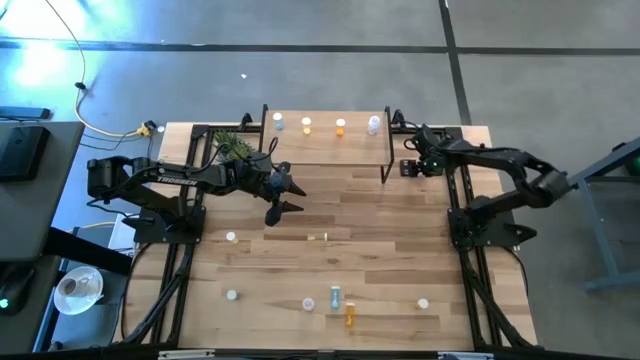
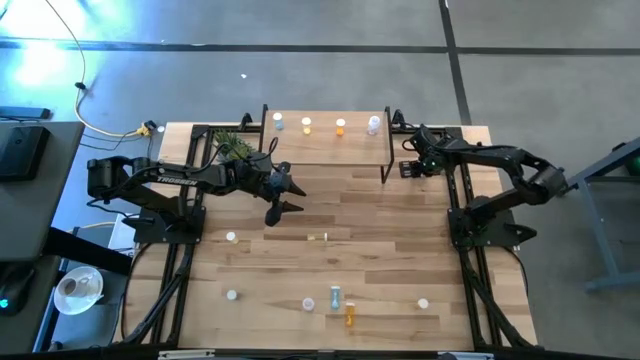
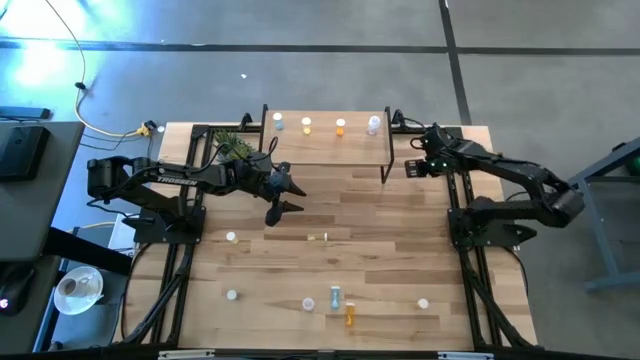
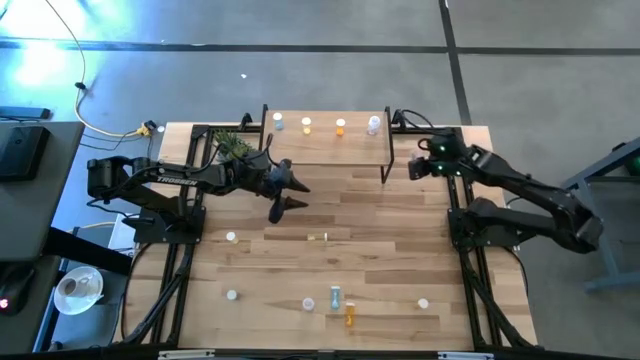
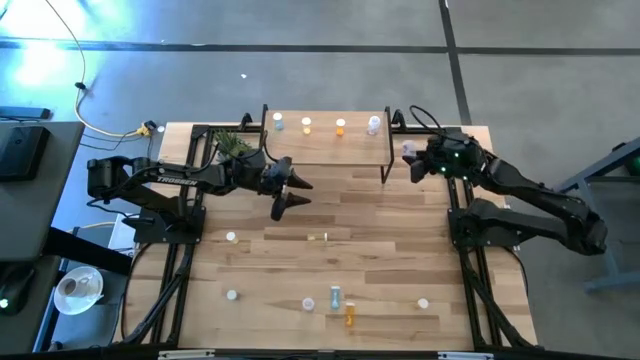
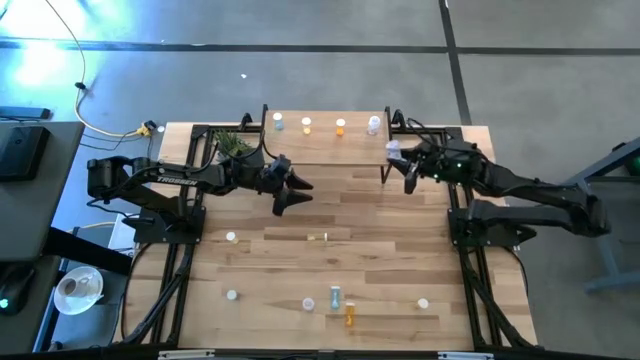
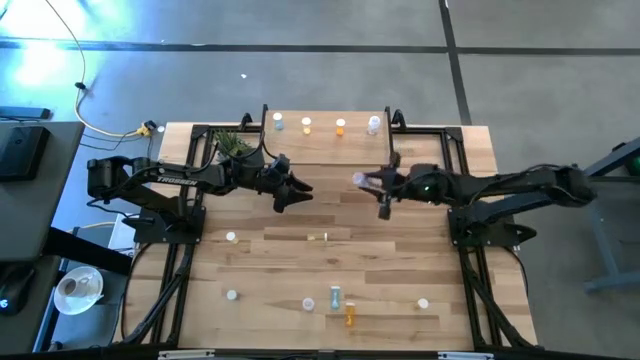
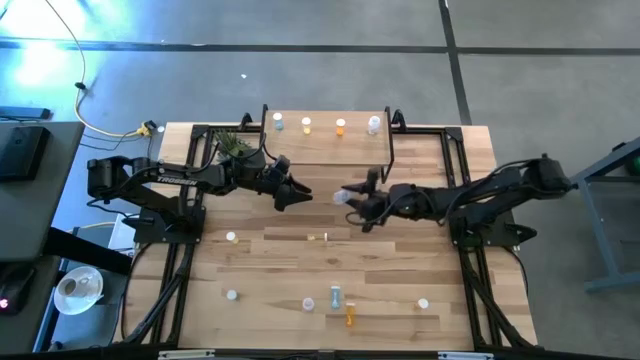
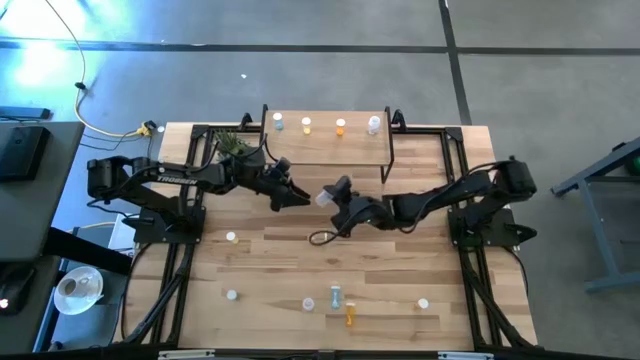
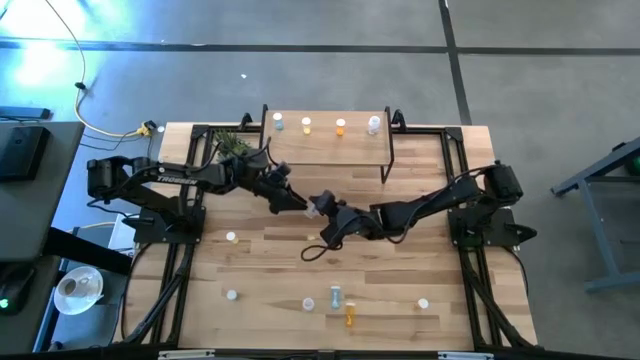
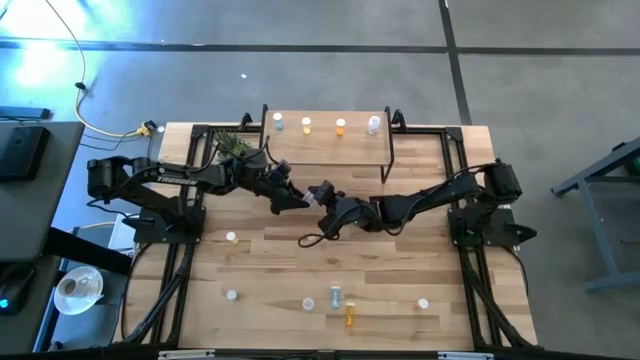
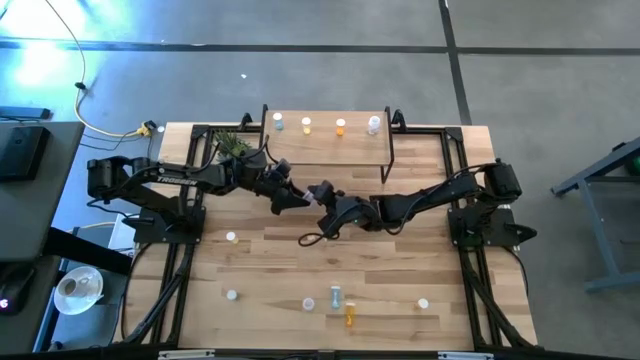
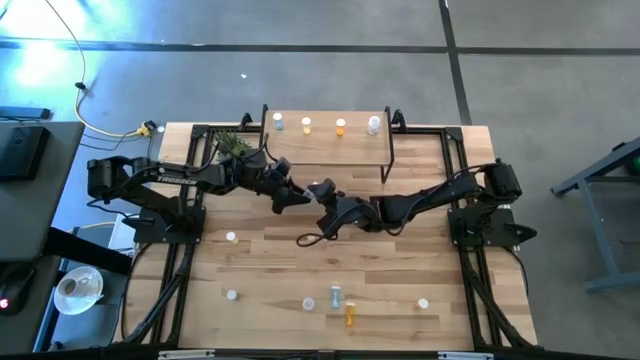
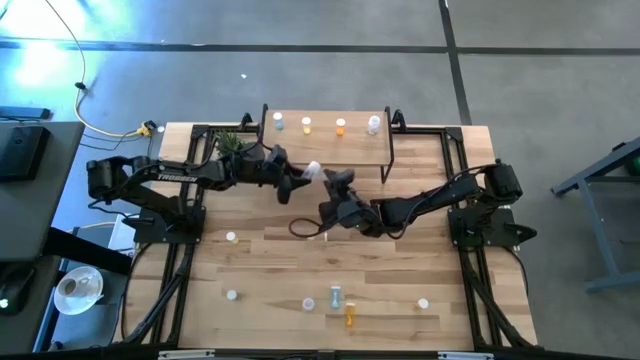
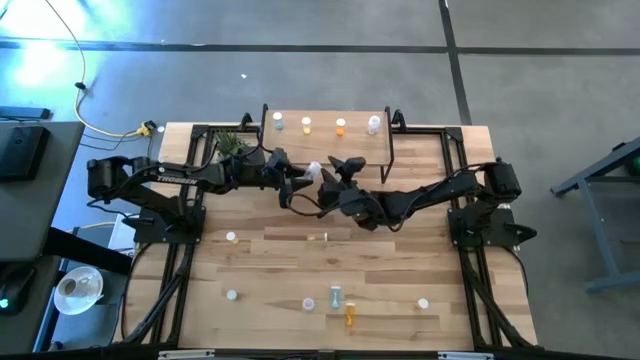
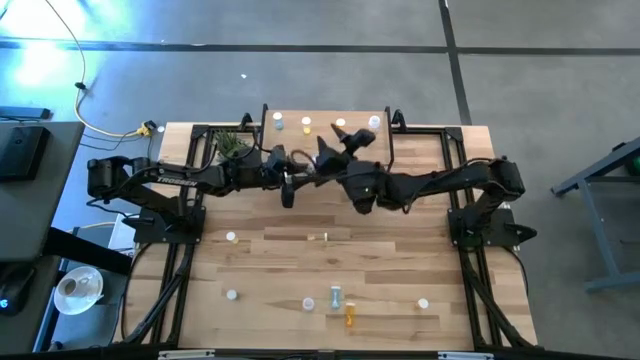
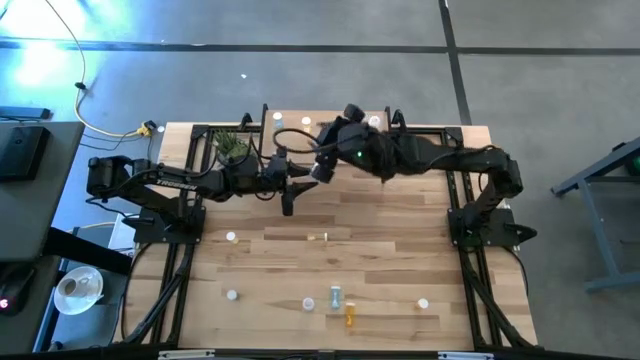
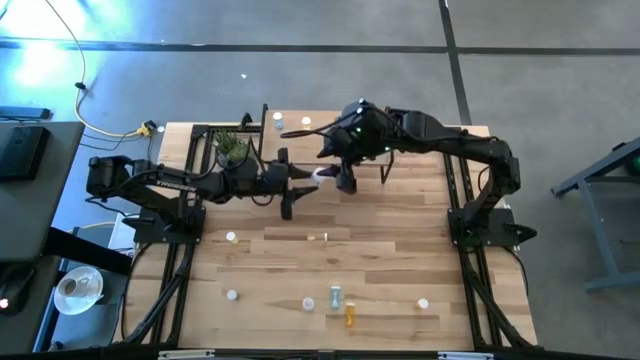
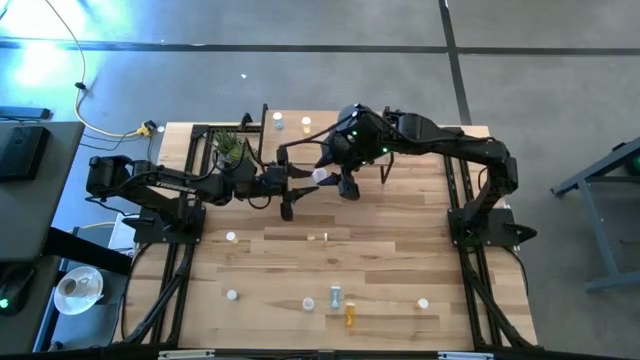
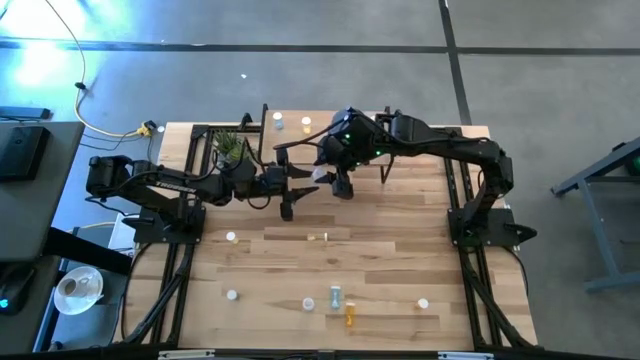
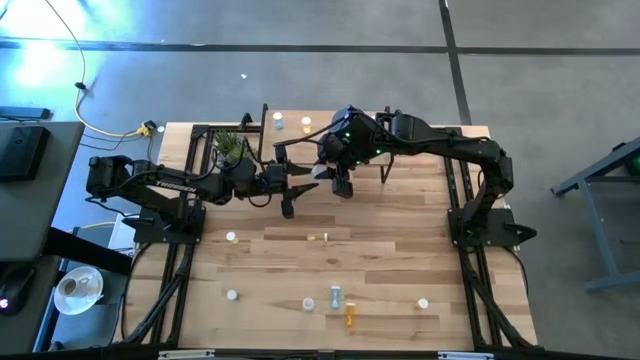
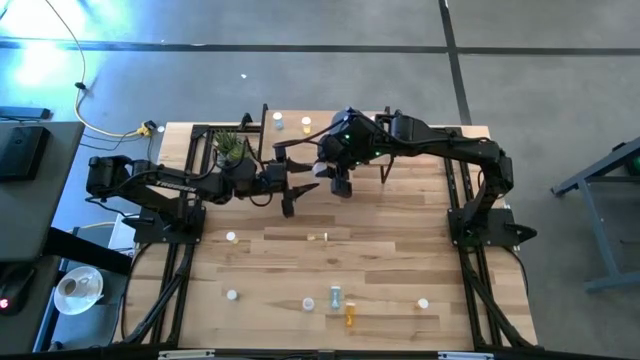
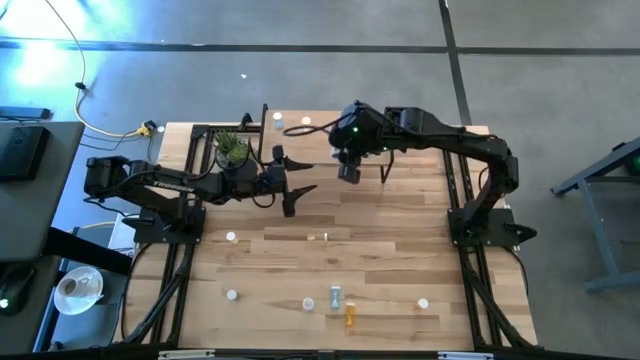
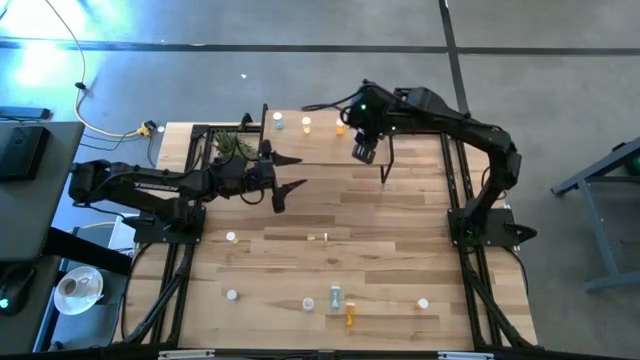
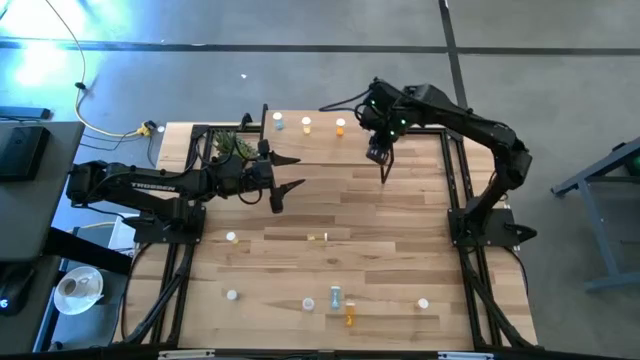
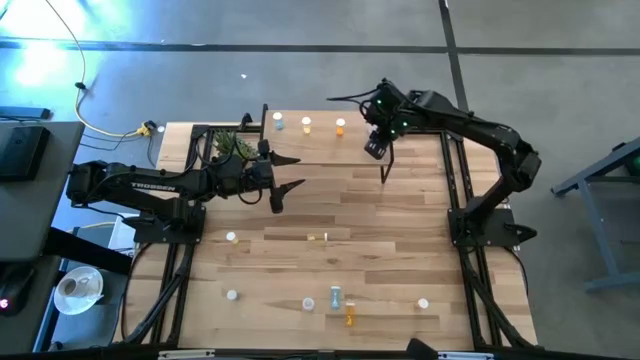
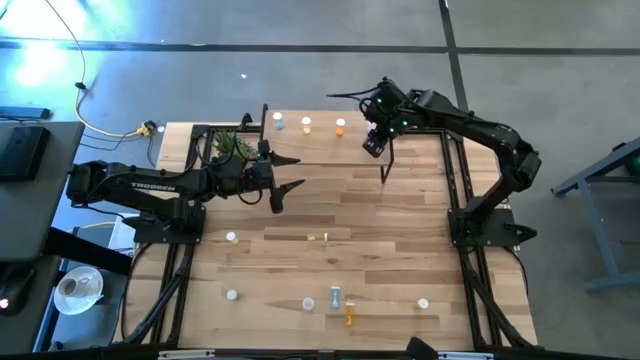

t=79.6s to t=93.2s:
Task: Pick and place medicine bottles onto shelf by color
Put the top transparent pill bottle on the shelf aligned with the transparent pill bottle

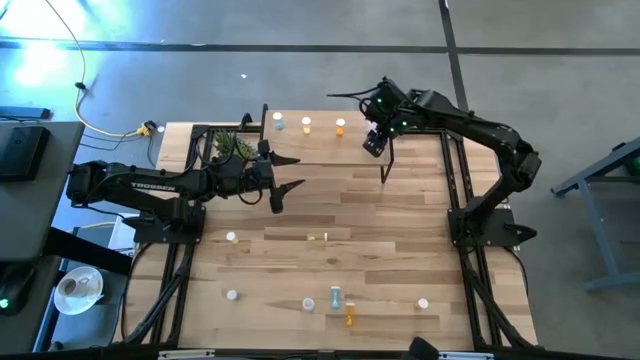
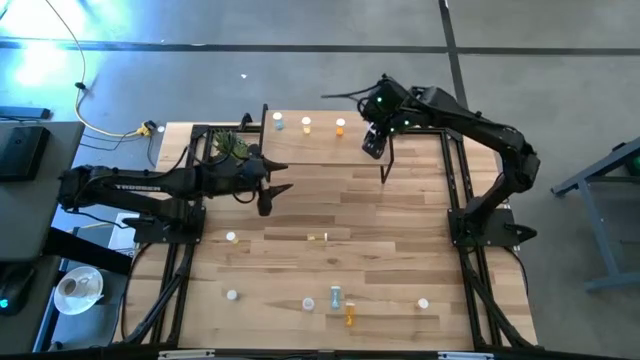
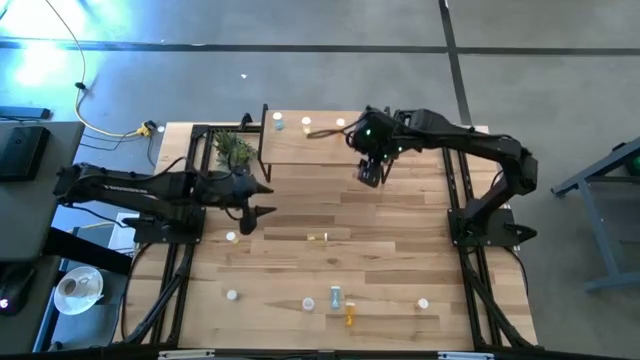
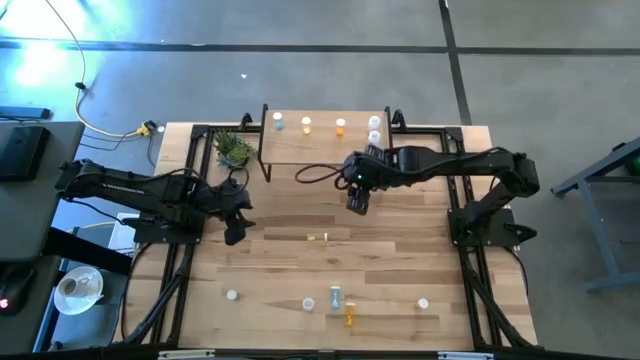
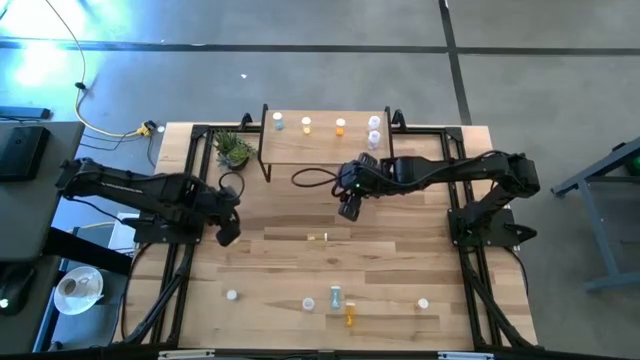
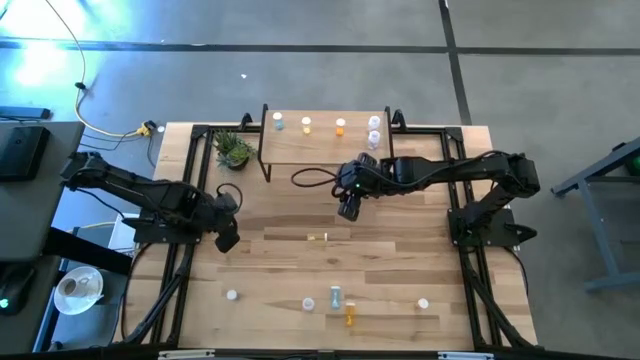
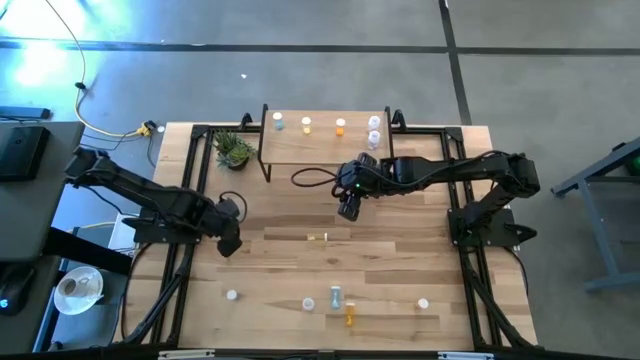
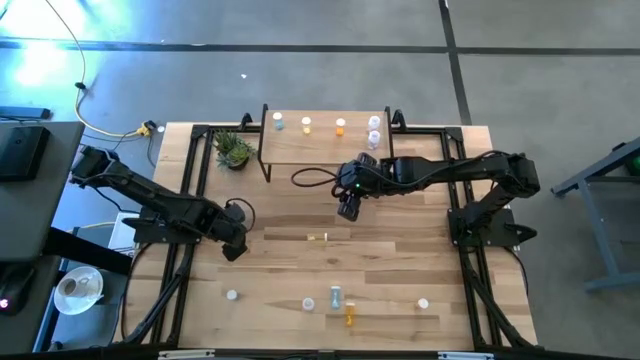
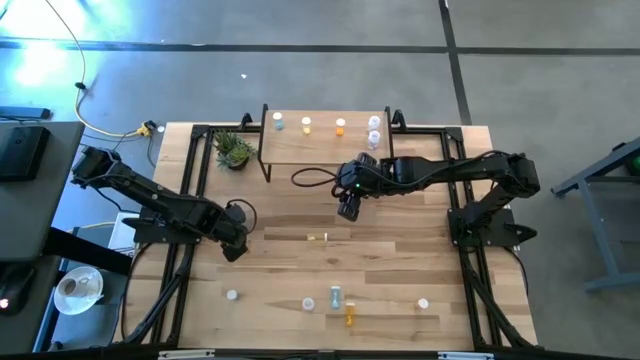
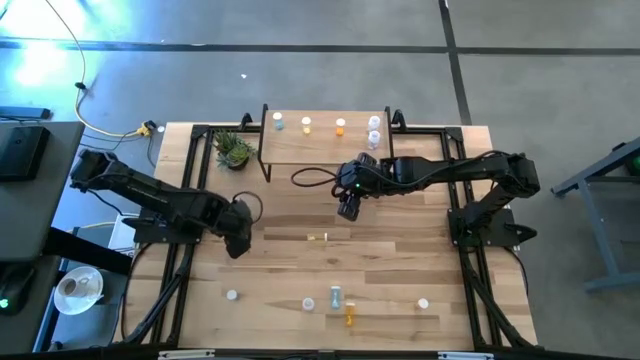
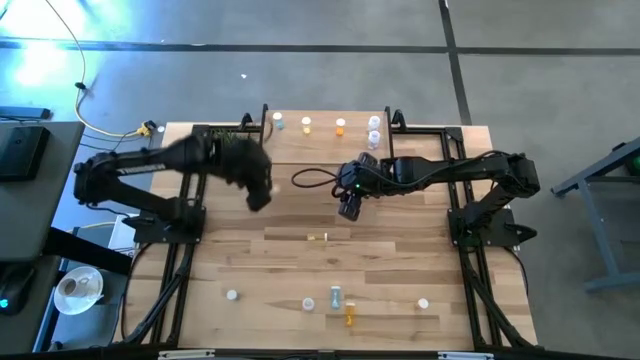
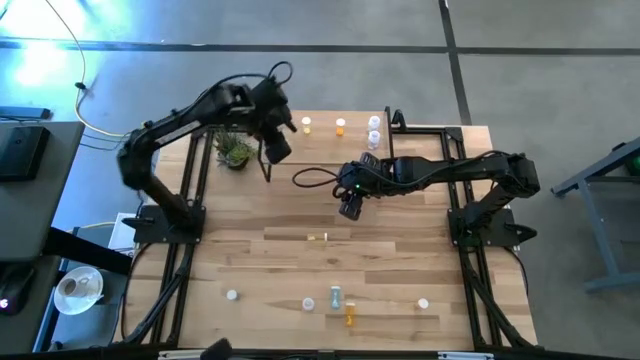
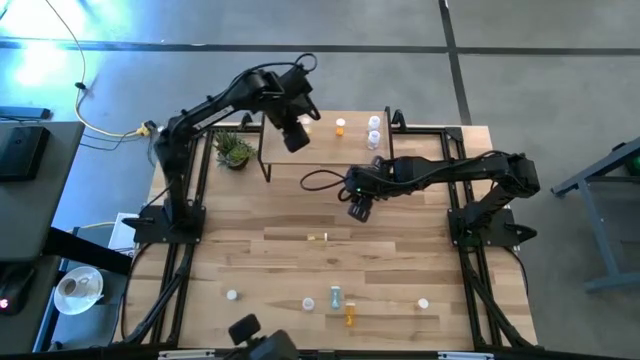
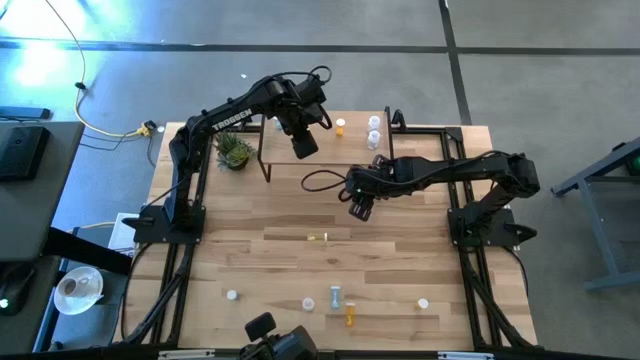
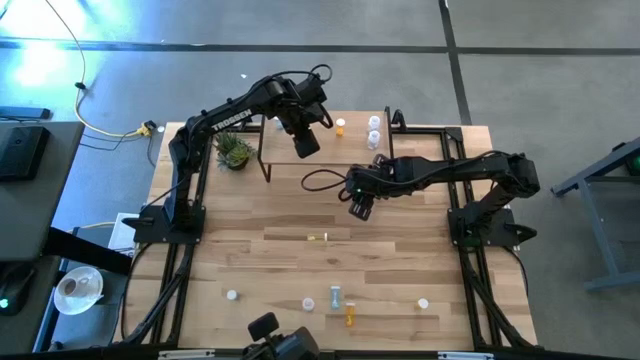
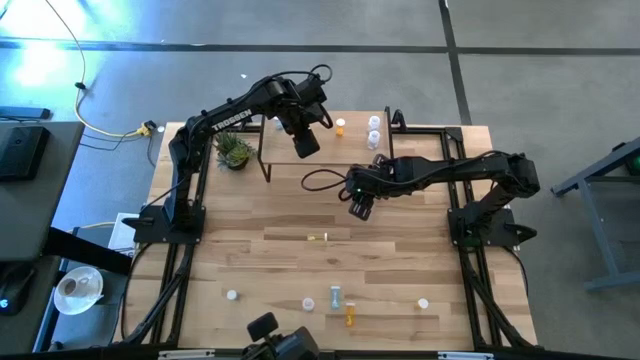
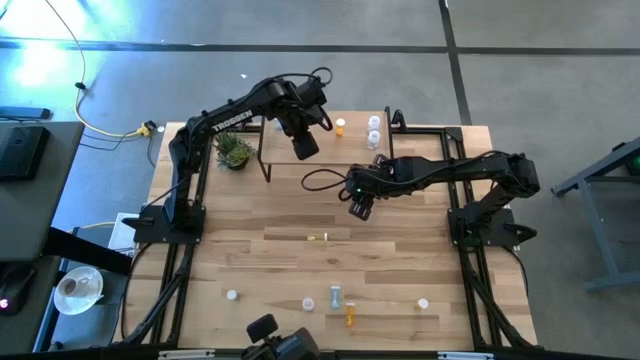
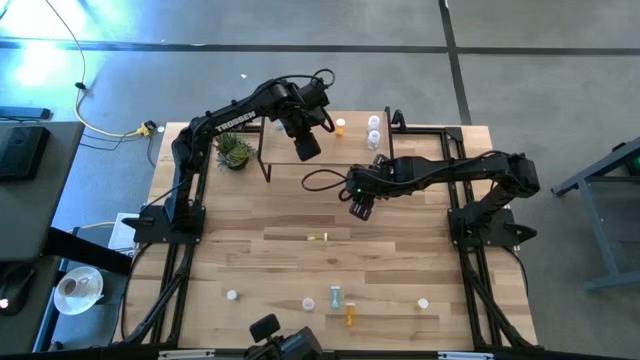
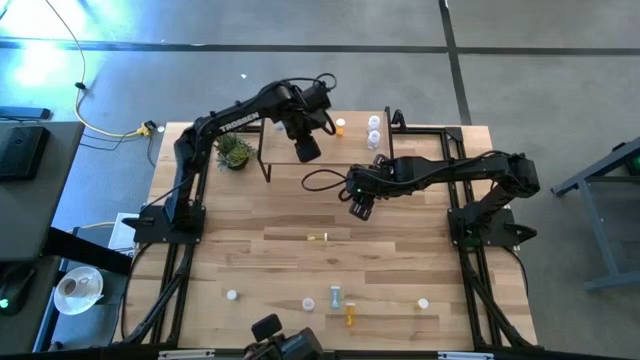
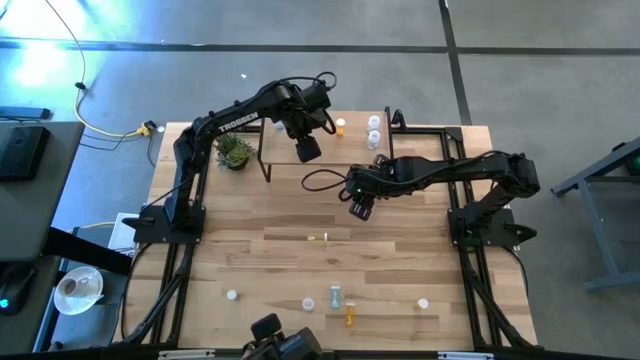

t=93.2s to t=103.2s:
Put the left yellow pill bottle on the shelf aligned with the yellow pill bottle
